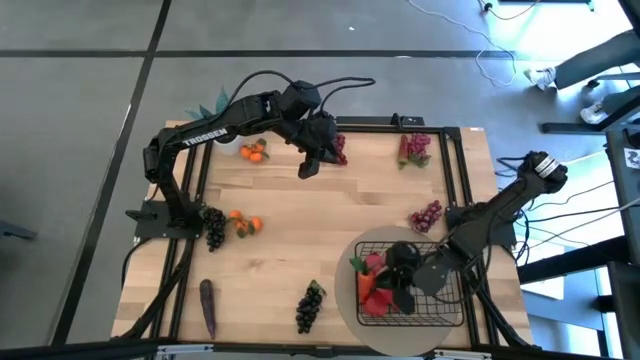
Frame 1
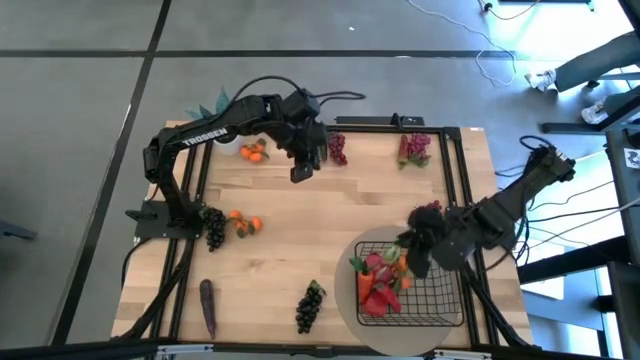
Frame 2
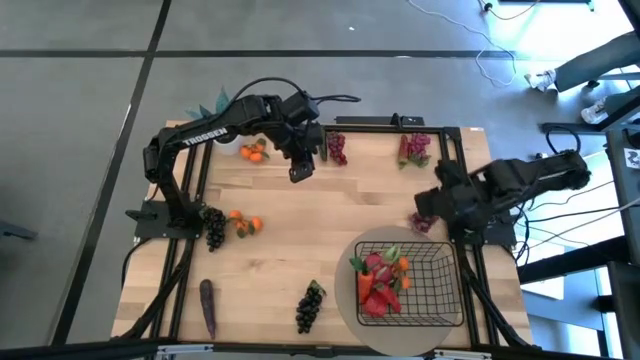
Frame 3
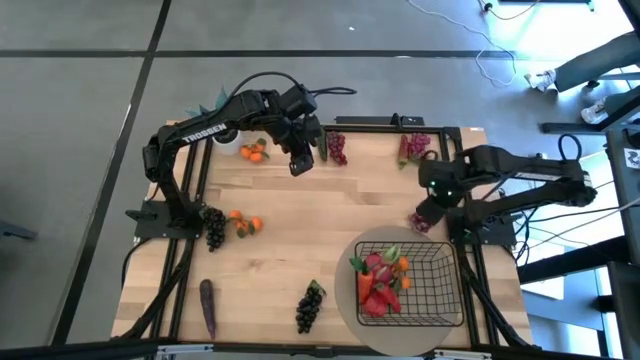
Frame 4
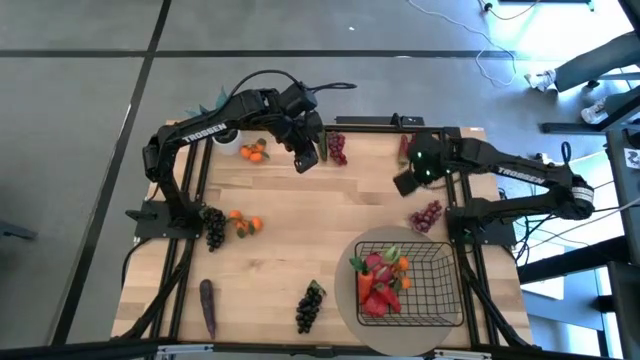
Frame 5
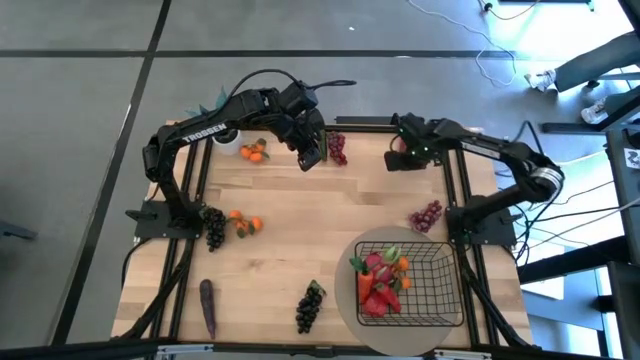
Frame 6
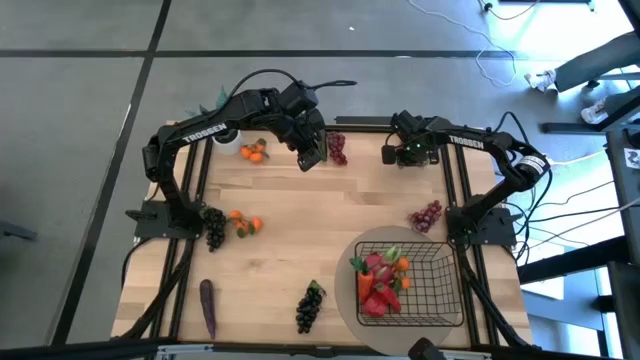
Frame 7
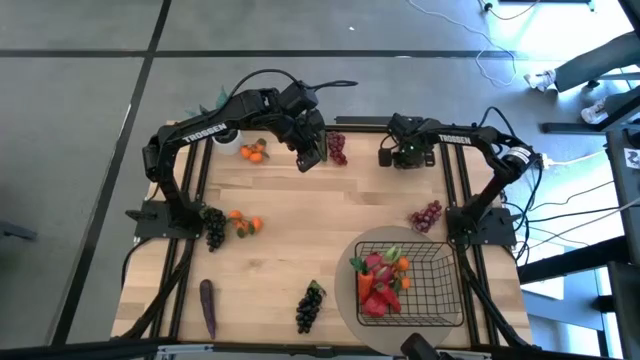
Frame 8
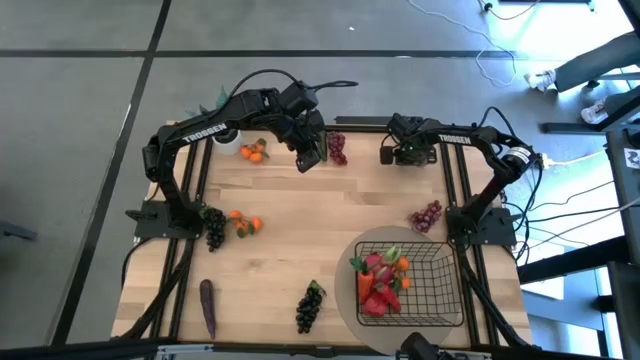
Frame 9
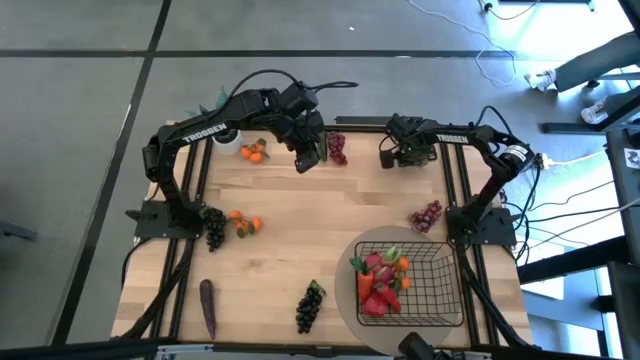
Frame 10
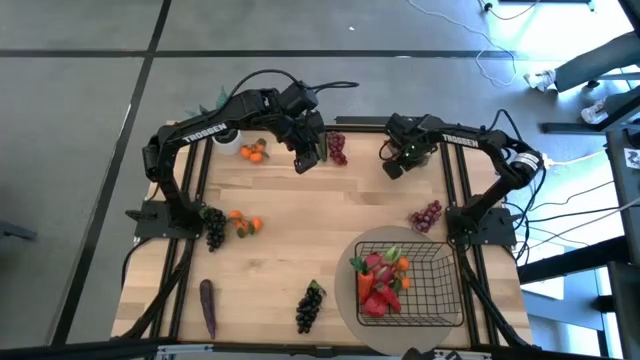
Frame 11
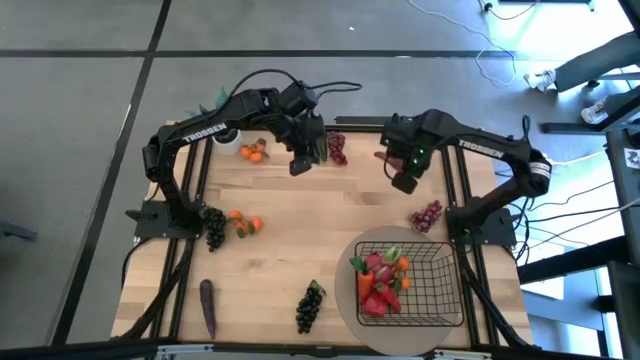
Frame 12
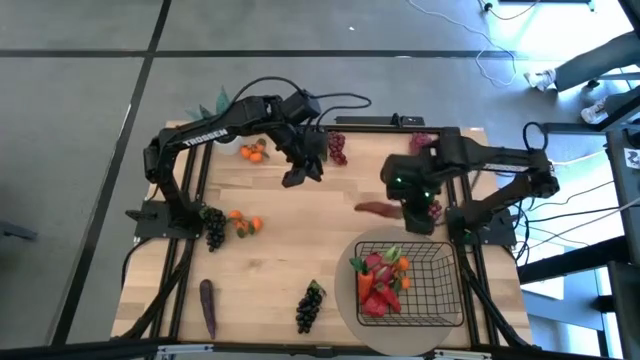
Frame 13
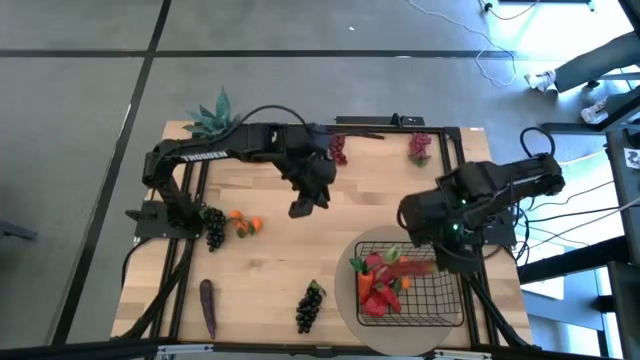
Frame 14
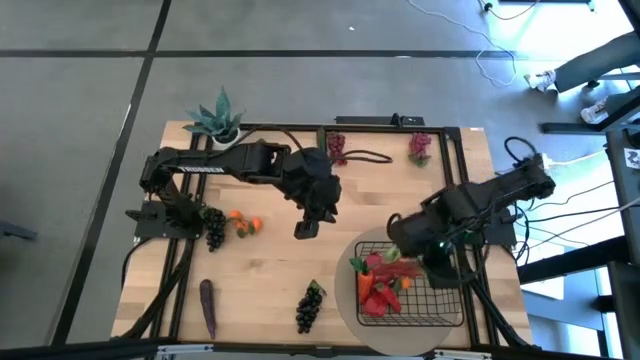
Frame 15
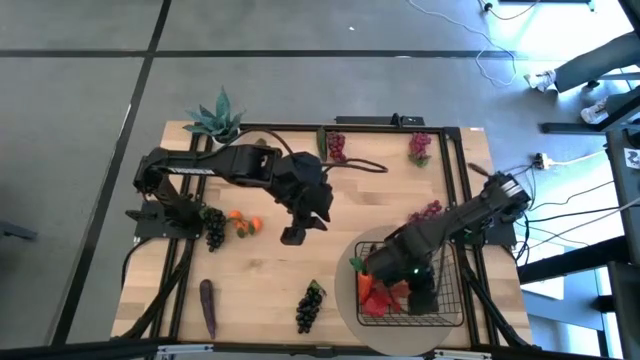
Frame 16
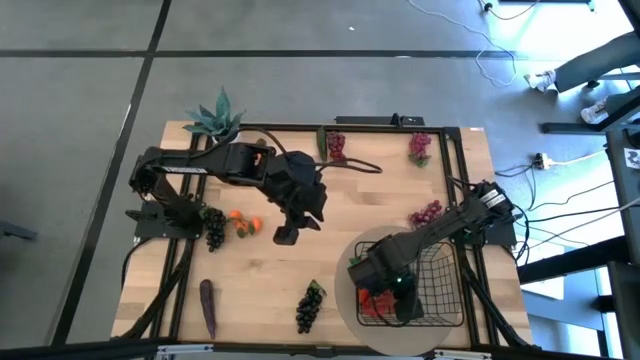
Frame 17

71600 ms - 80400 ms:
Task: Build produce basket
Put the red chili pepper into the black wire basket

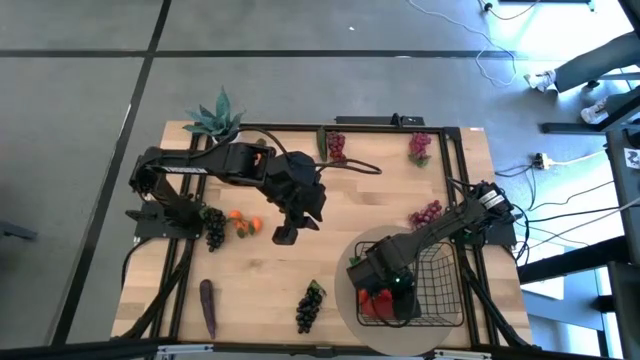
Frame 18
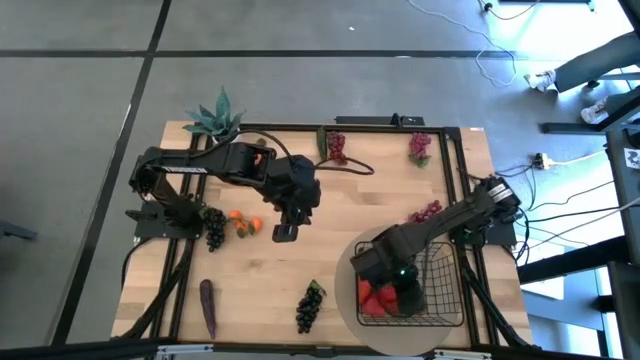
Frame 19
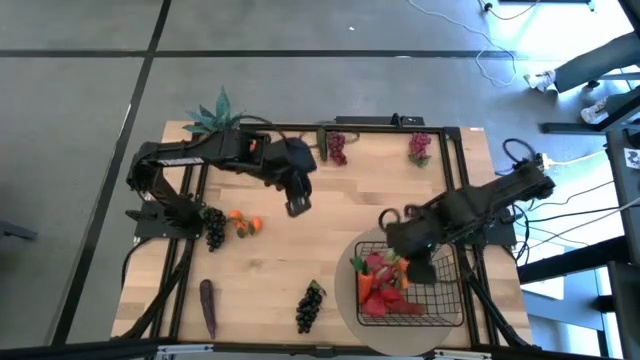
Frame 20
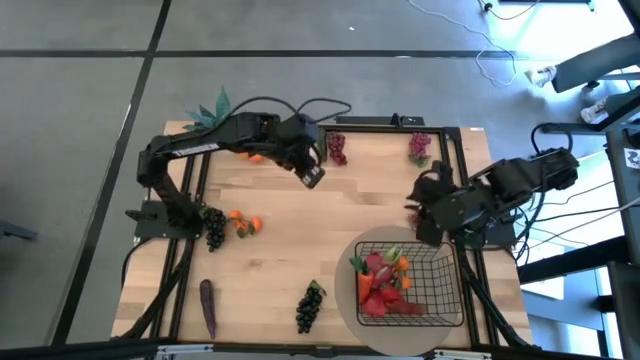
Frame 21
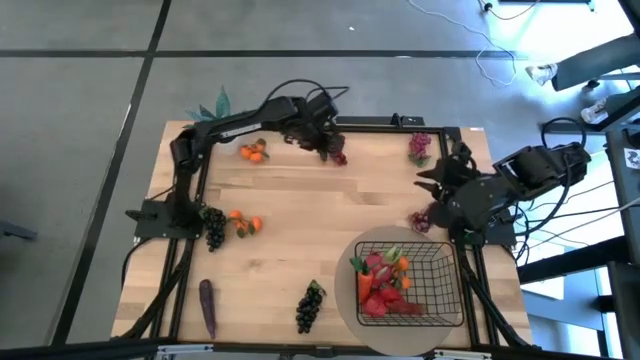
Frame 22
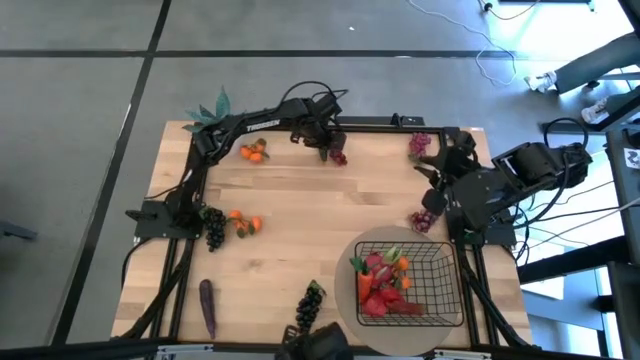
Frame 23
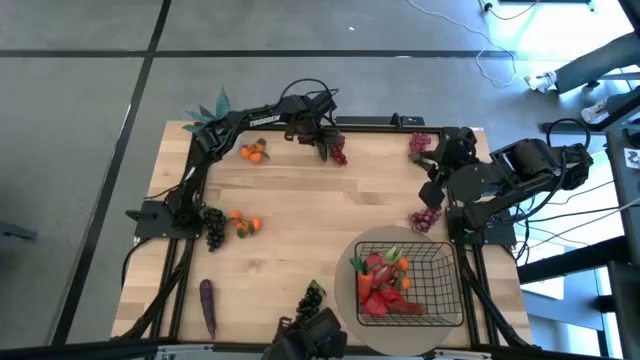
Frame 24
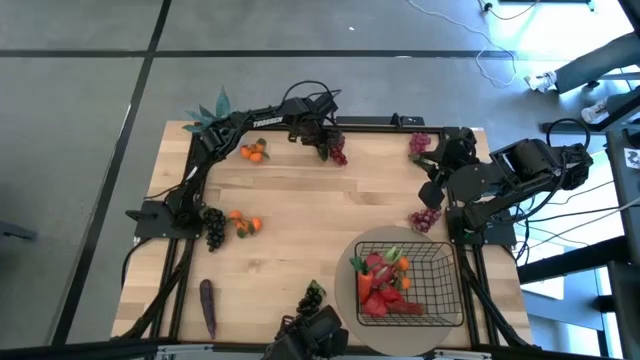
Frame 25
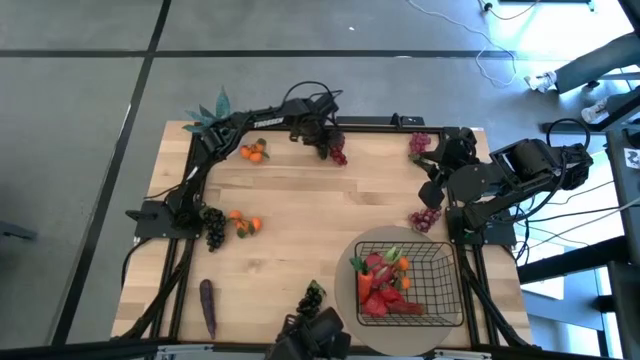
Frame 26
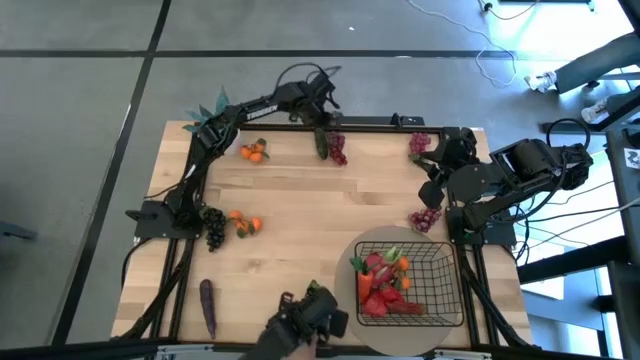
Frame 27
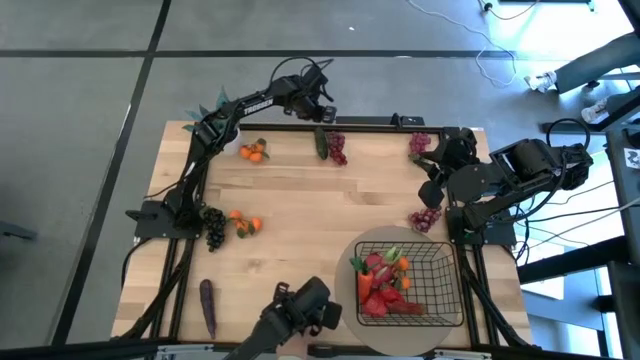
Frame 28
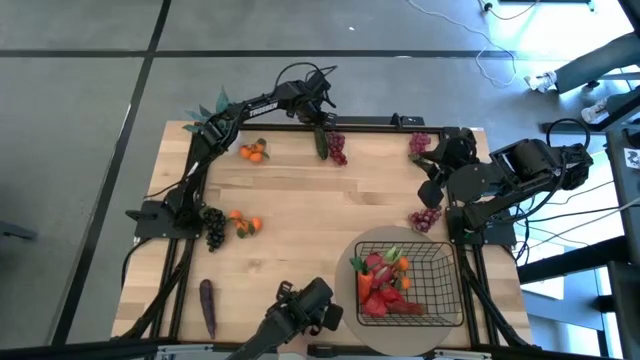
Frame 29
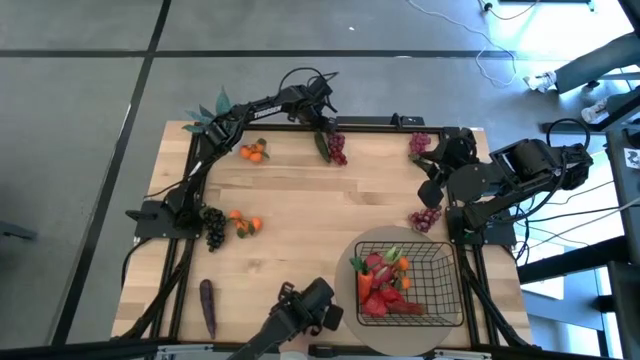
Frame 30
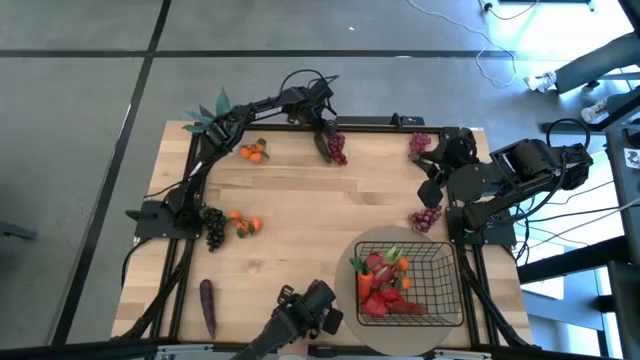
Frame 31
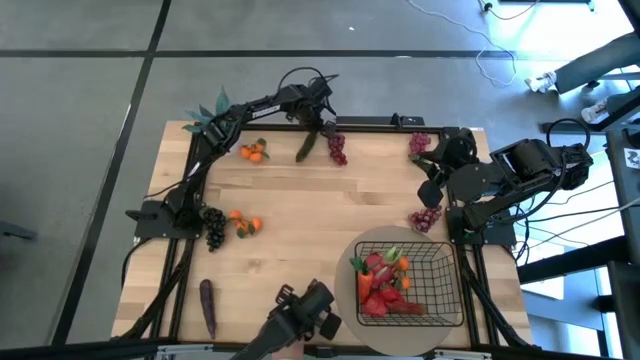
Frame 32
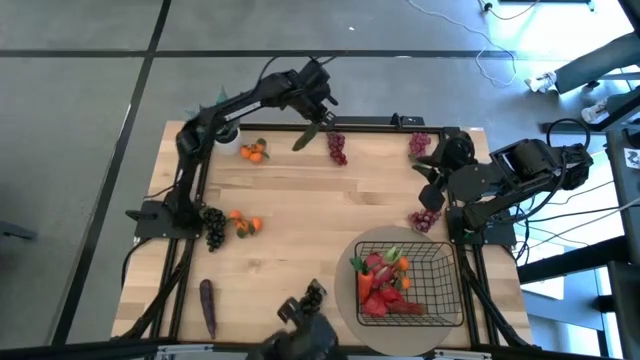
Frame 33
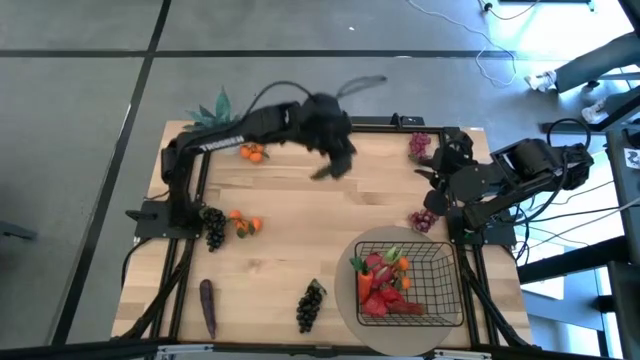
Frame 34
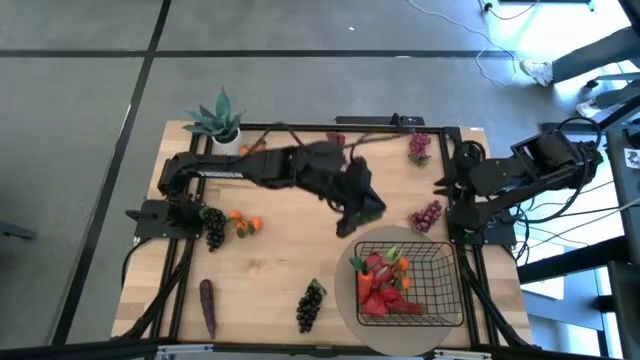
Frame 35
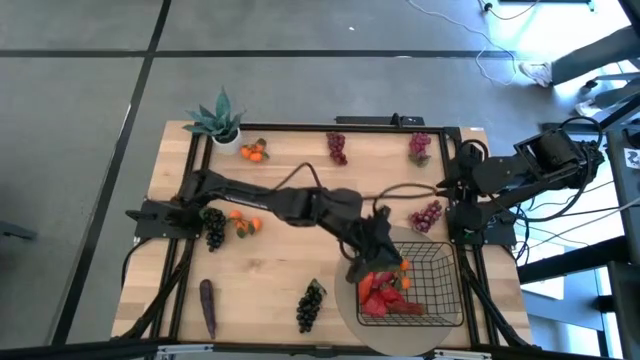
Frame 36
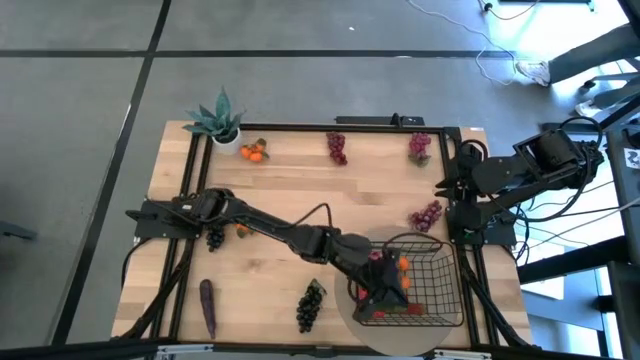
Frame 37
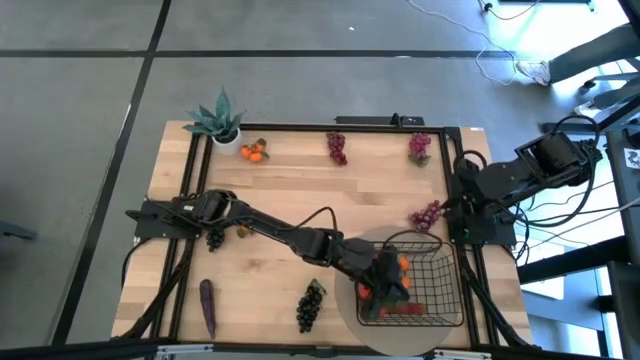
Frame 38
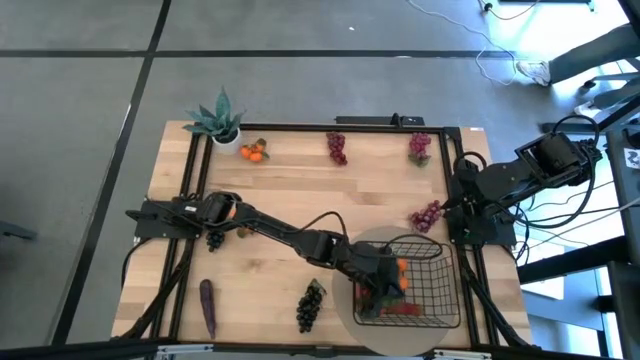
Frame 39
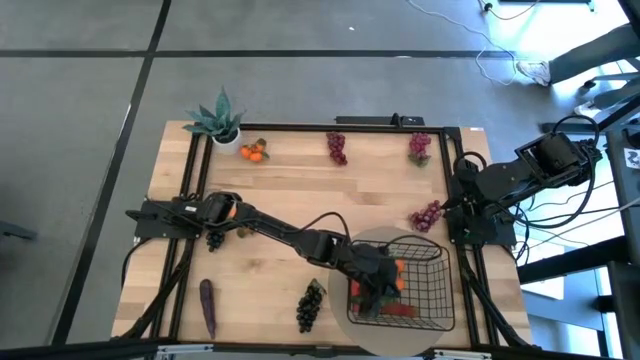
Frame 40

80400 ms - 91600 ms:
Put the green chili pepper into the black wire basket

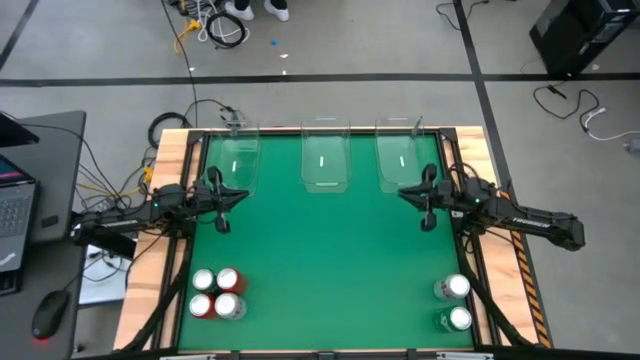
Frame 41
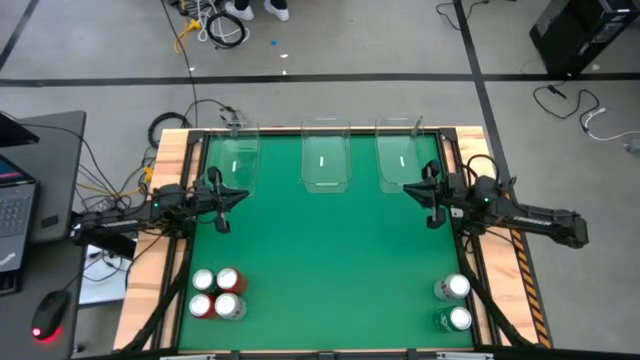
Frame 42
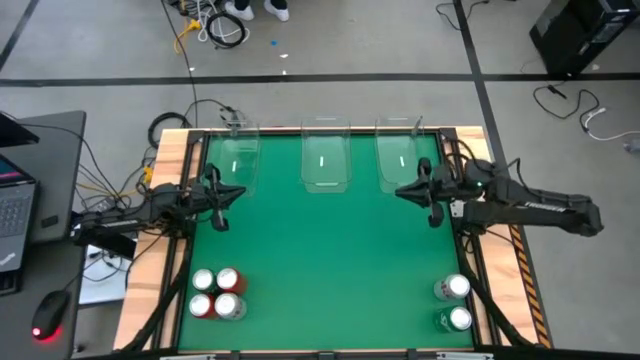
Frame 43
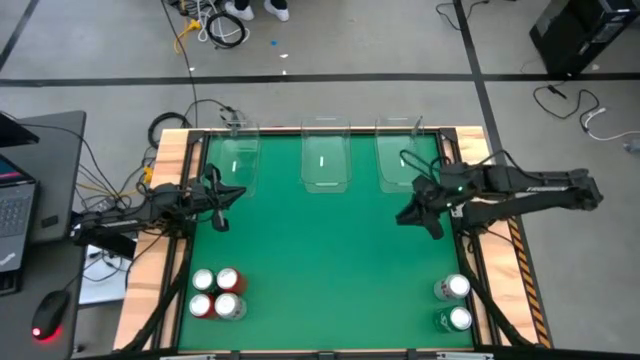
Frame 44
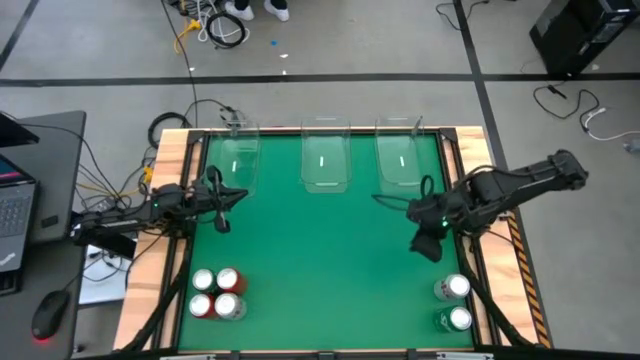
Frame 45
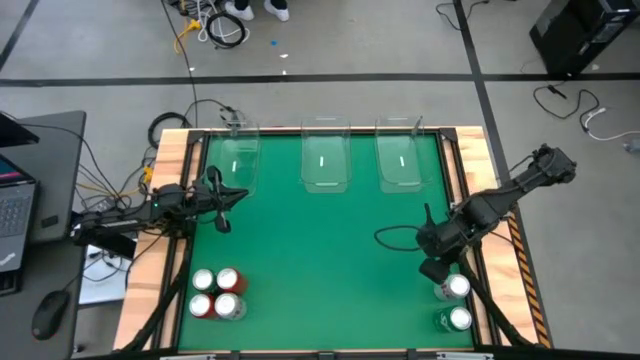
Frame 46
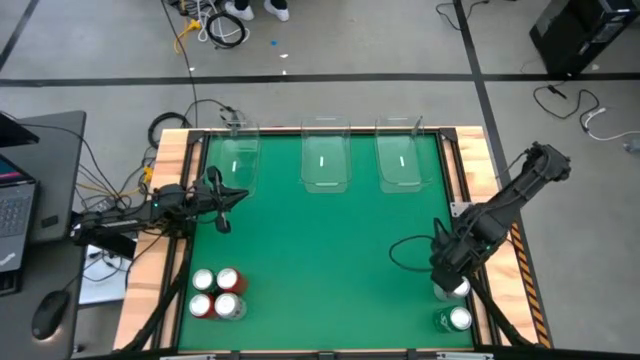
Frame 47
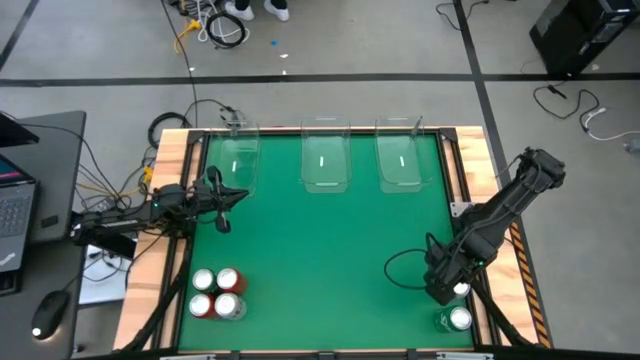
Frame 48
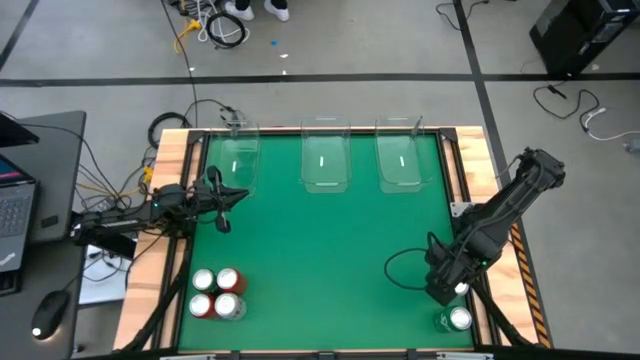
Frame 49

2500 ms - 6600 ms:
Task: Sort soda cans
Put the right white soda can into the right transparent bin
